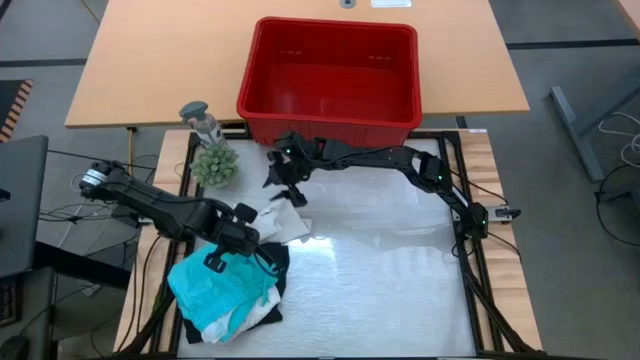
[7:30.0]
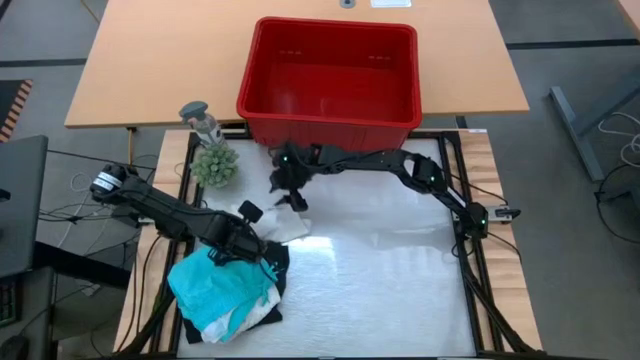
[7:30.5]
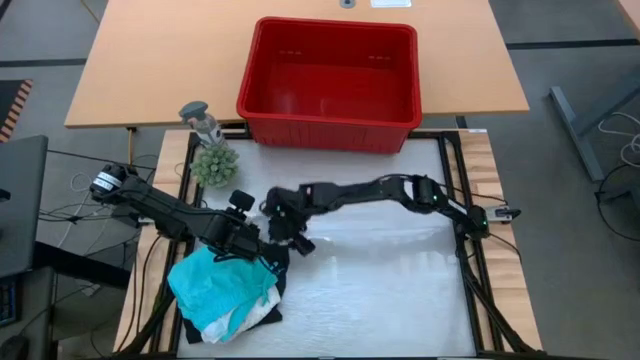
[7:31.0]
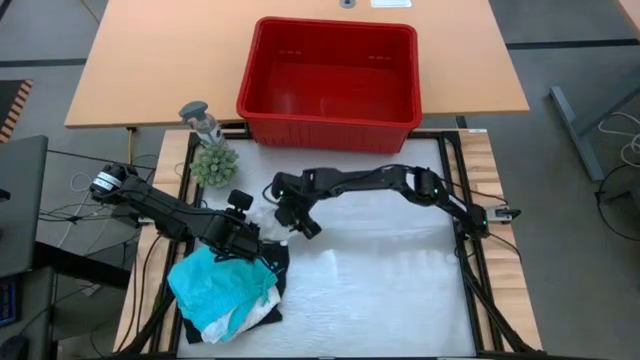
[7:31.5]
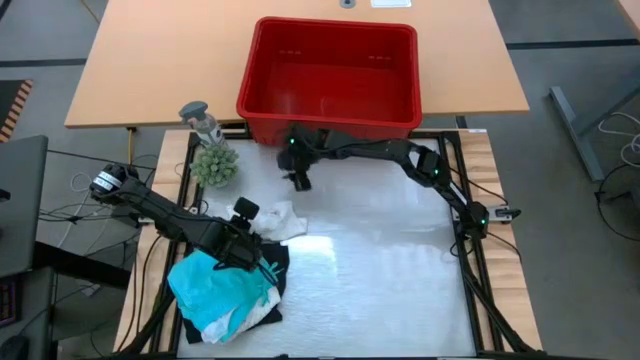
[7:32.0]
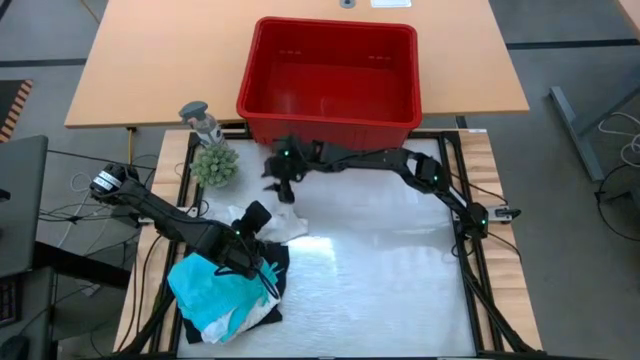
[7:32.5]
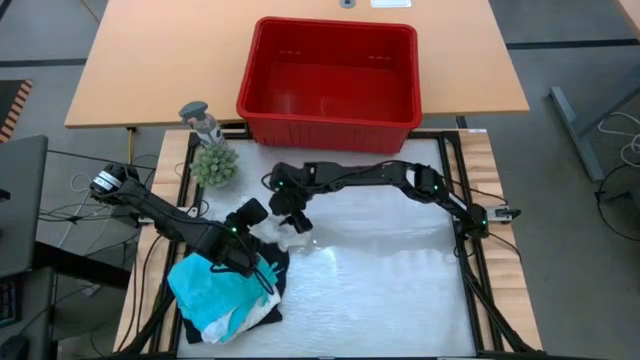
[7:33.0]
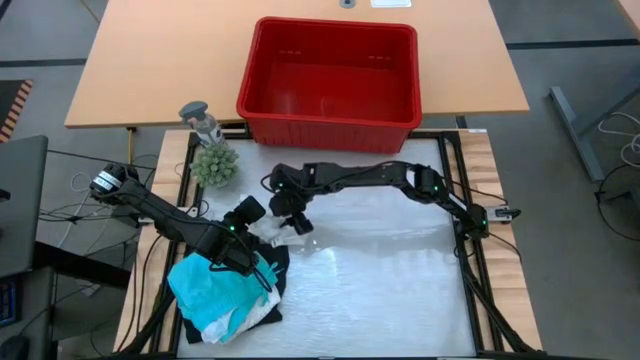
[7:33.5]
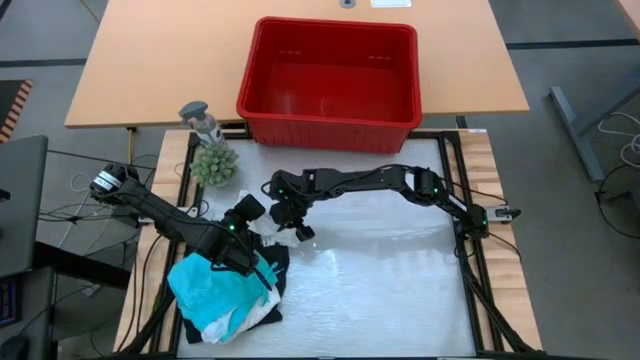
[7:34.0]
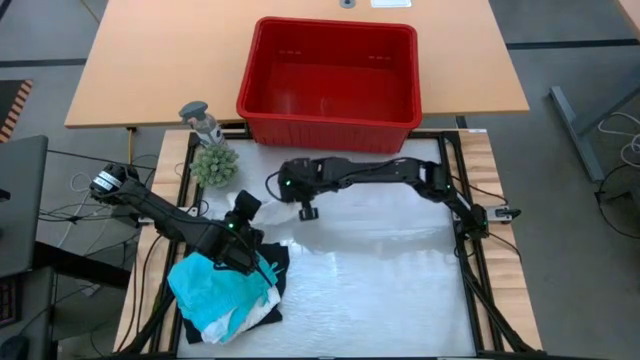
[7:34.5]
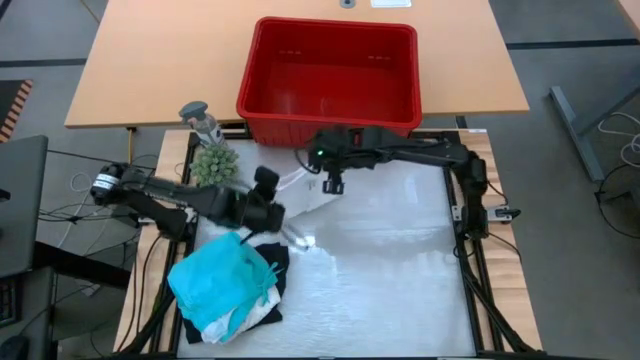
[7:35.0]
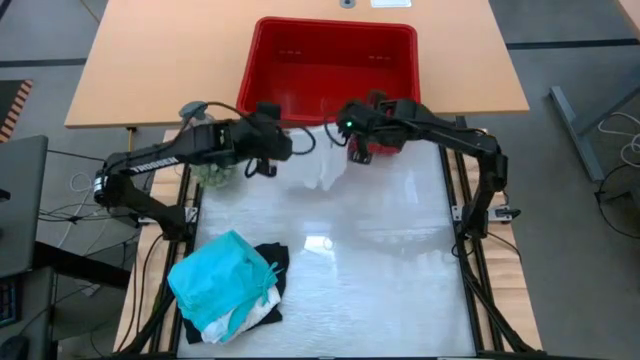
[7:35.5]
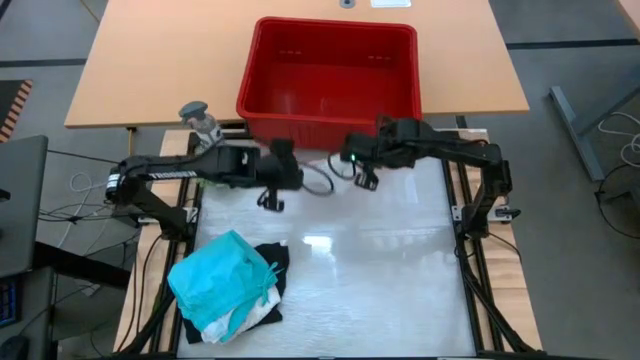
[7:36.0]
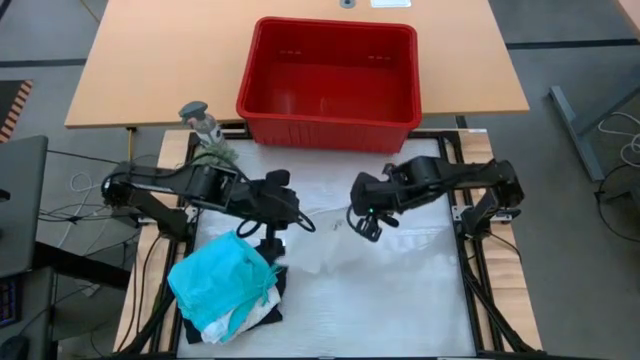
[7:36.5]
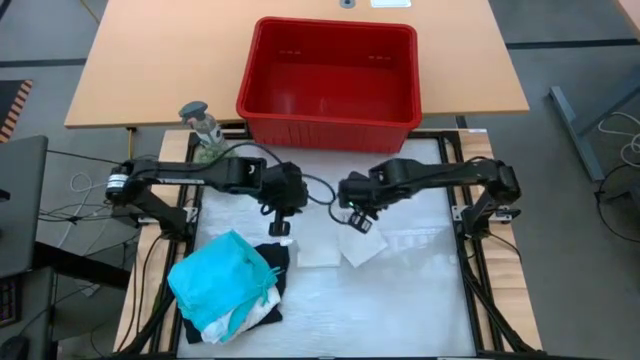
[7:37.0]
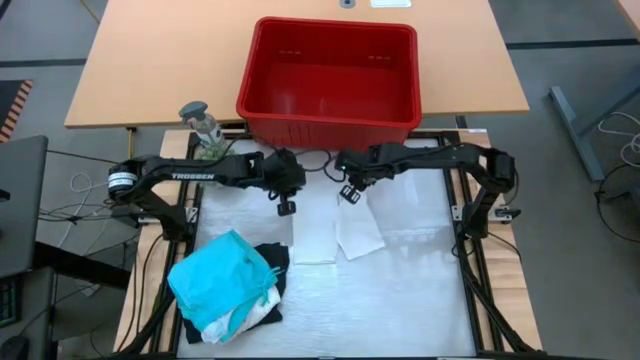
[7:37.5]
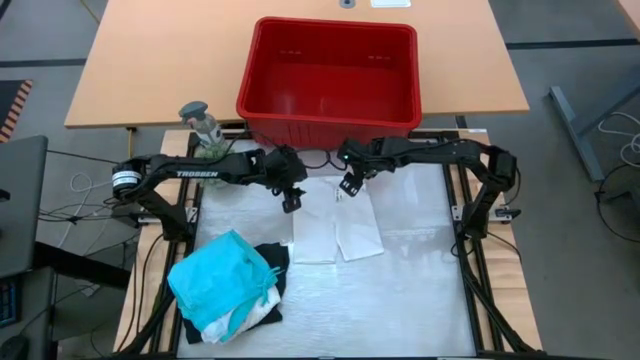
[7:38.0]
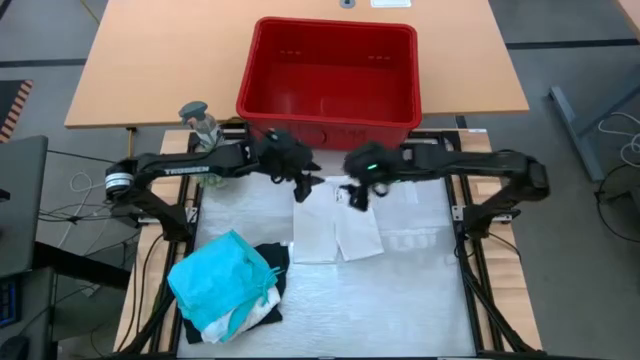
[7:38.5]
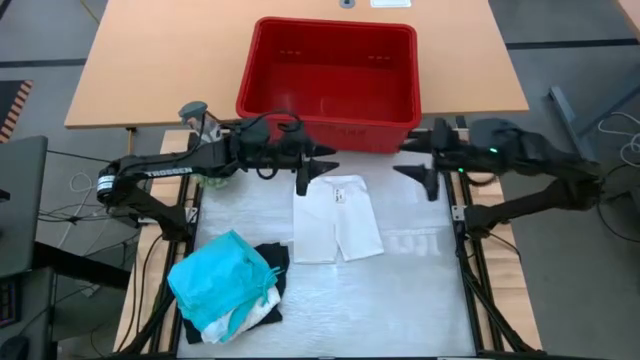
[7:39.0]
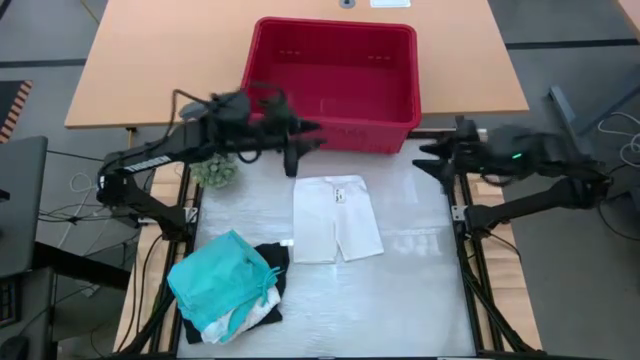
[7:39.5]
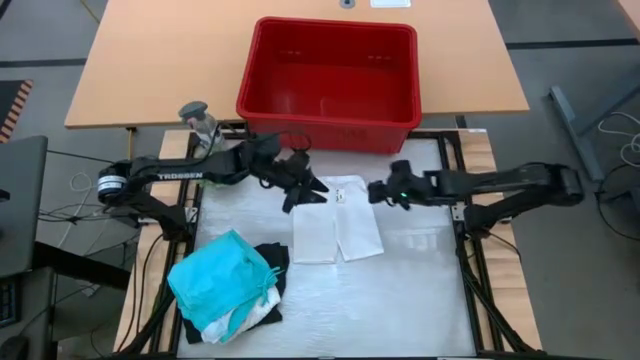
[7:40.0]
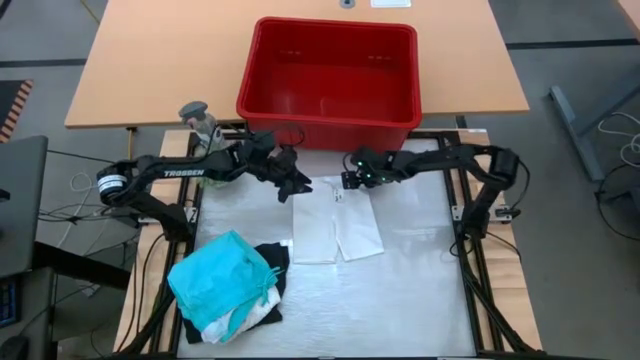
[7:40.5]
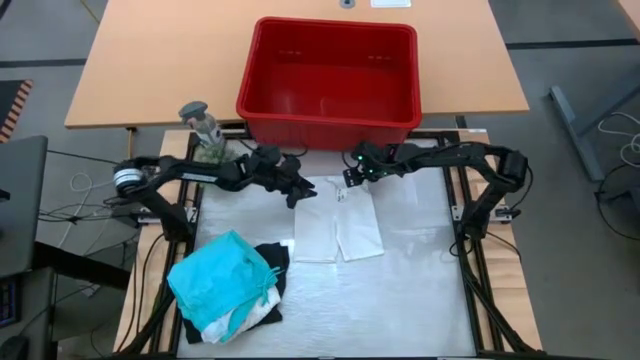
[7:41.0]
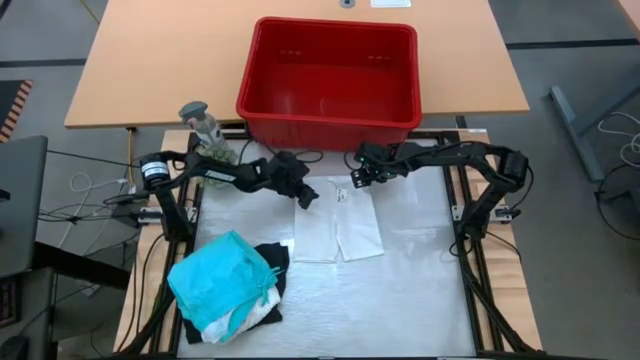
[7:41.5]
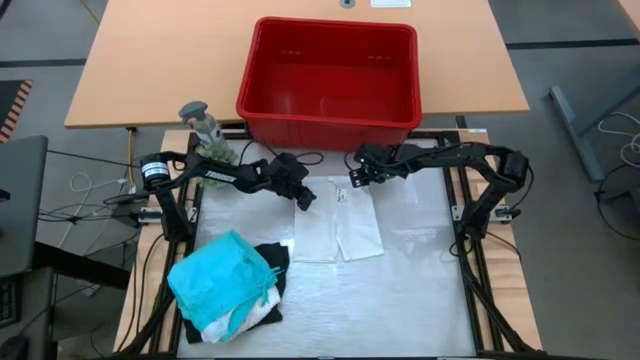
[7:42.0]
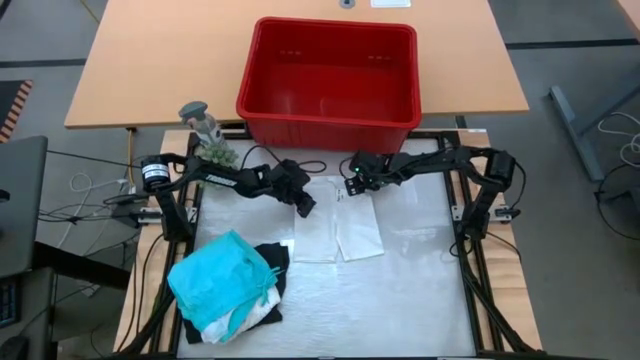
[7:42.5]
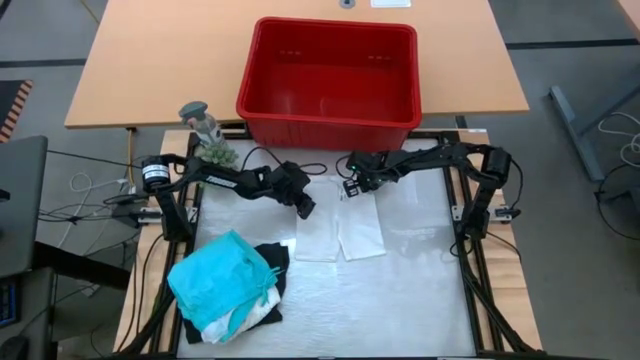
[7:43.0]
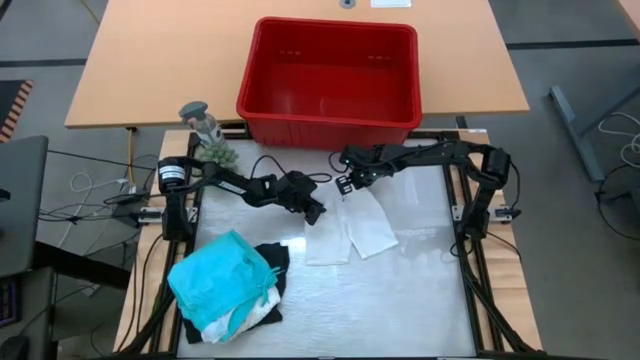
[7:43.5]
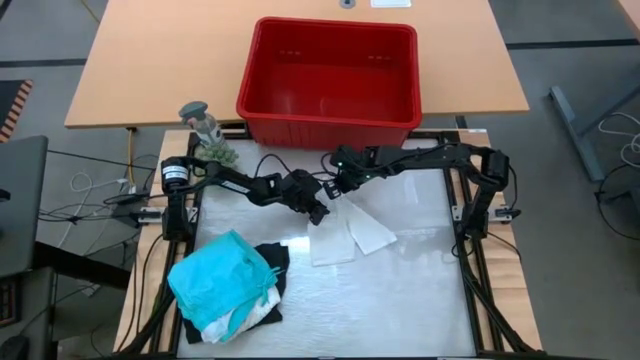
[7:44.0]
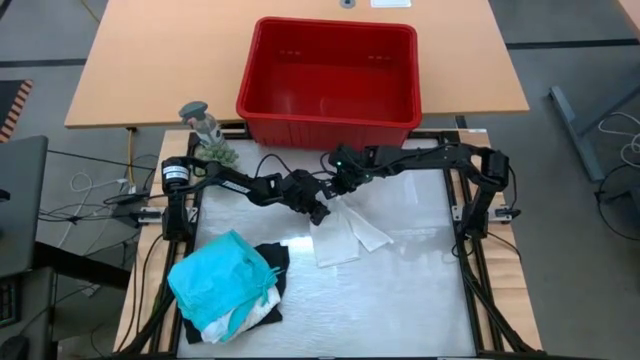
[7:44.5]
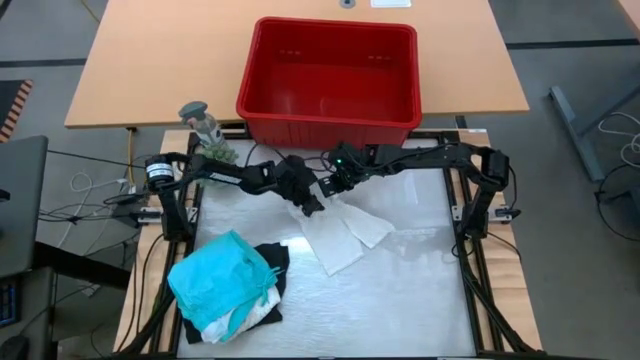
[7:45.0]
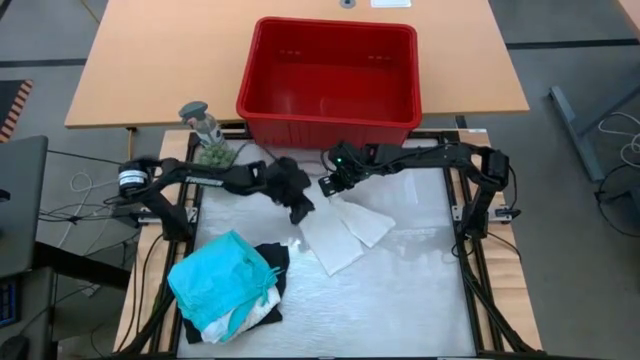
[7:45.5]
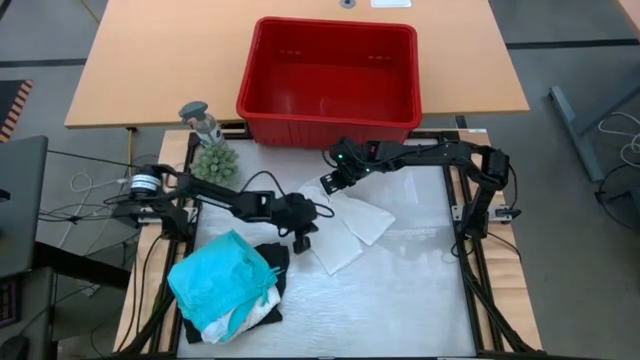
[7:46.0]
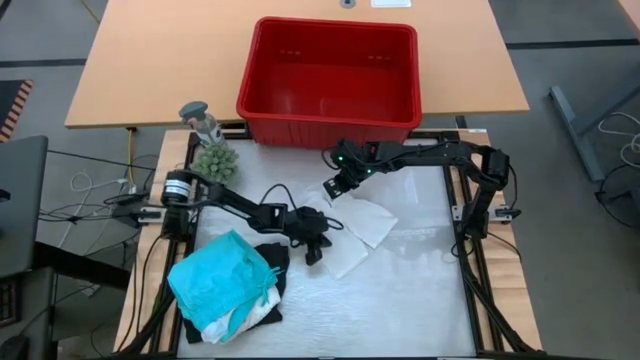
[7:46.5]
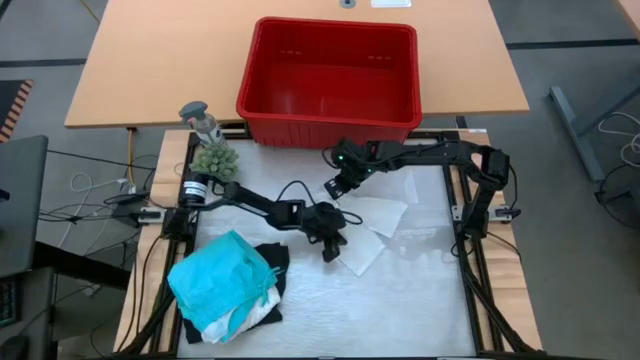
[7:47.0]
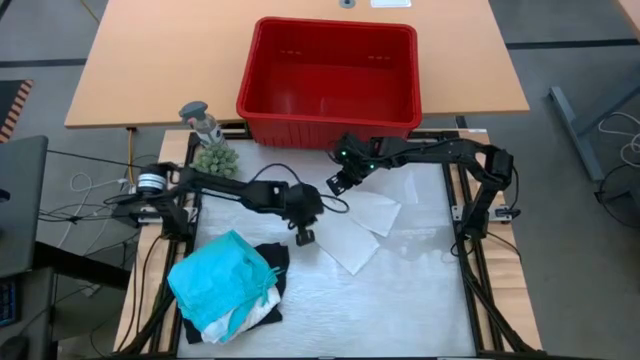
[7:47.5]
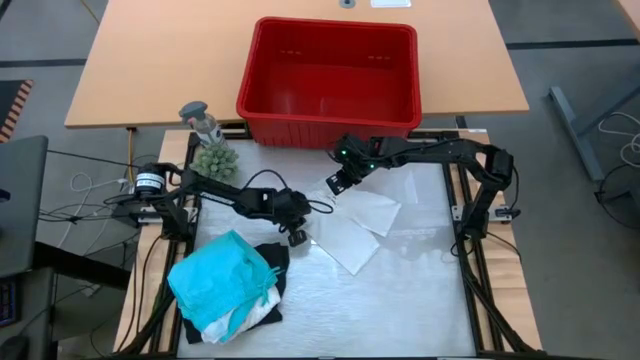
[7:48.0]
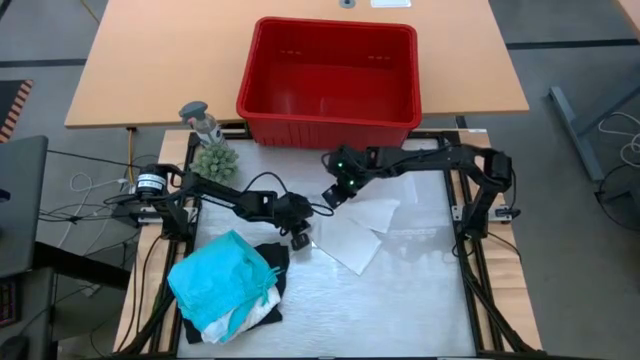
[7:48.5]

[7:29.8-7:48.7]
Task: Fold Laundry from Bin
Fold the white shorts
